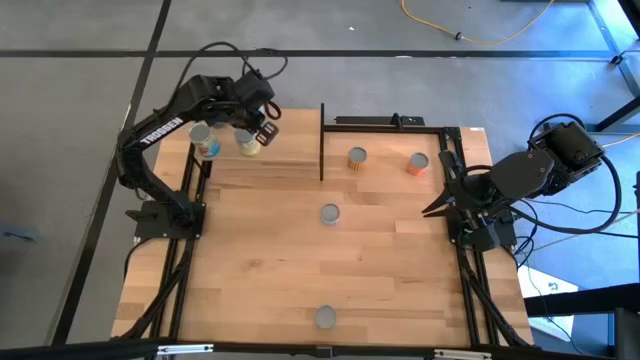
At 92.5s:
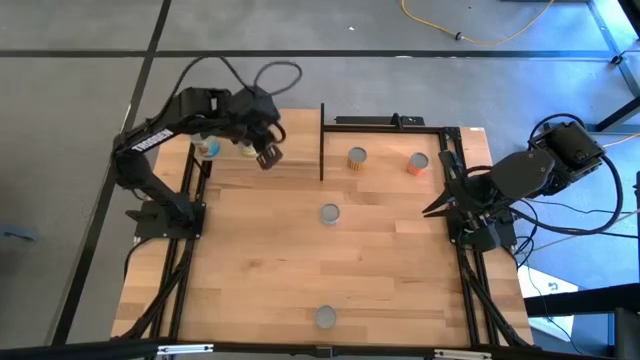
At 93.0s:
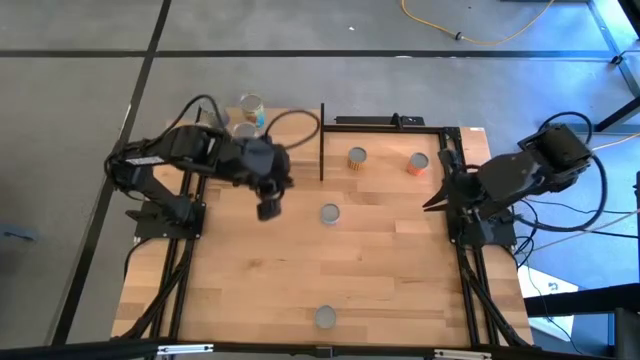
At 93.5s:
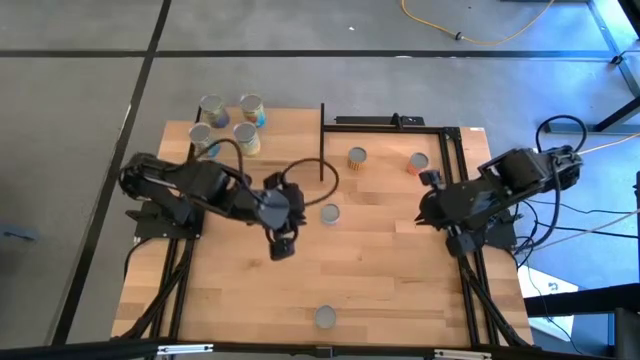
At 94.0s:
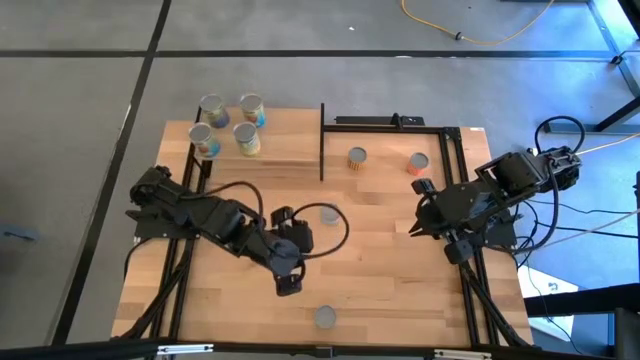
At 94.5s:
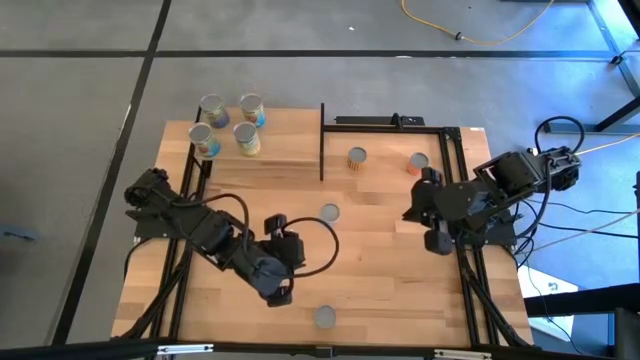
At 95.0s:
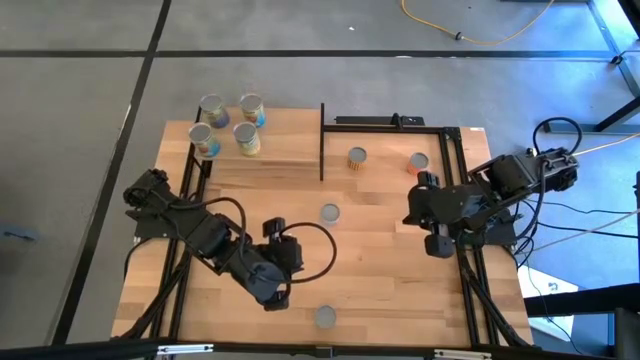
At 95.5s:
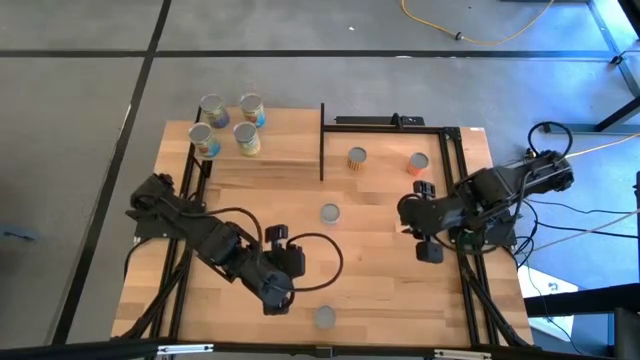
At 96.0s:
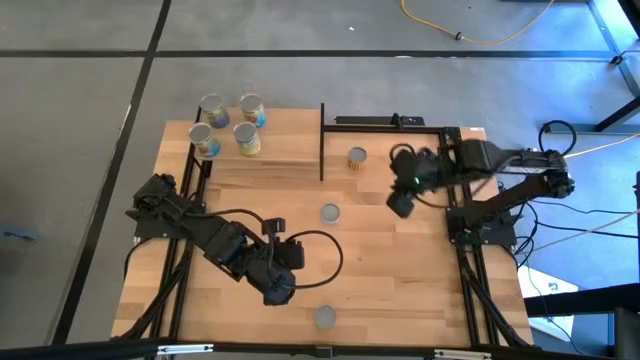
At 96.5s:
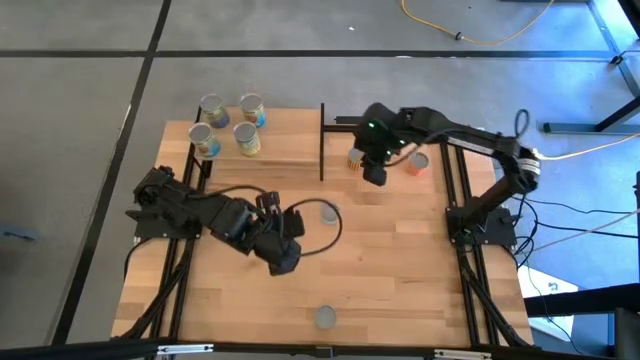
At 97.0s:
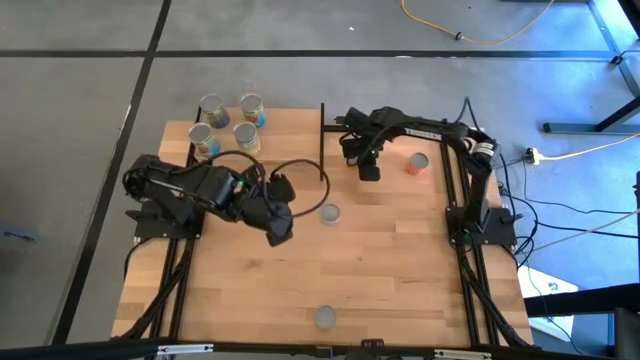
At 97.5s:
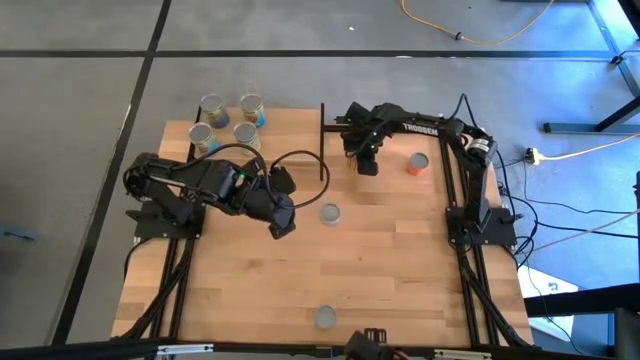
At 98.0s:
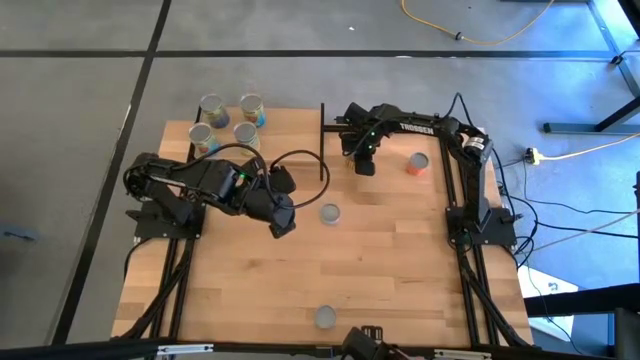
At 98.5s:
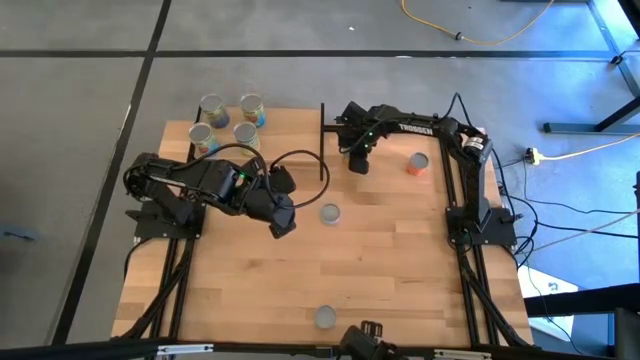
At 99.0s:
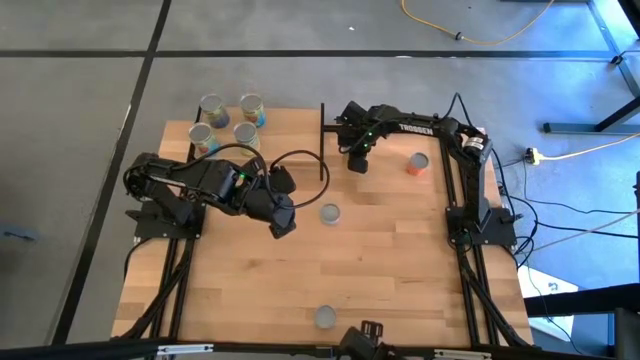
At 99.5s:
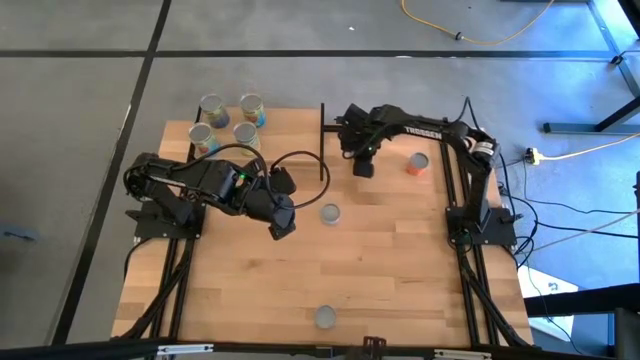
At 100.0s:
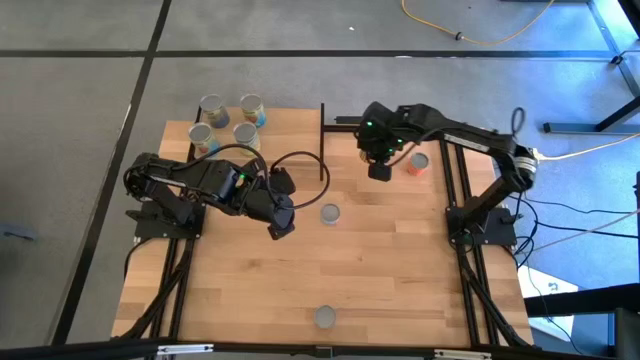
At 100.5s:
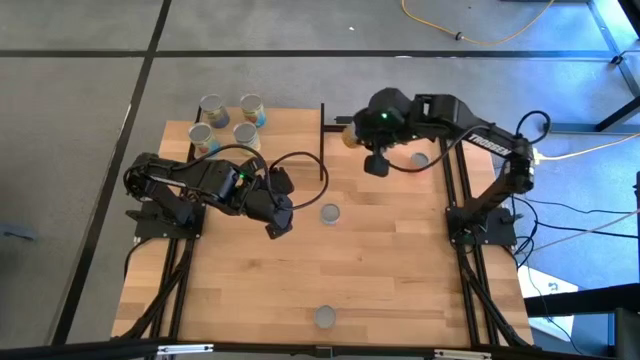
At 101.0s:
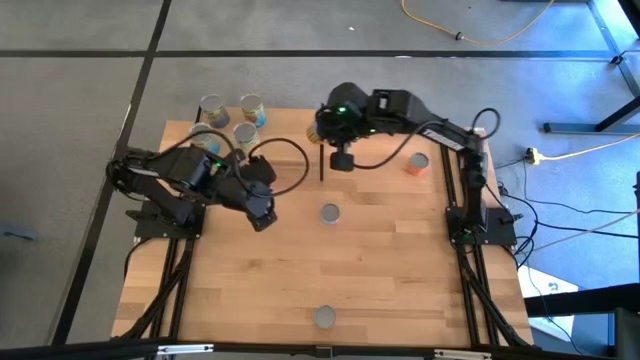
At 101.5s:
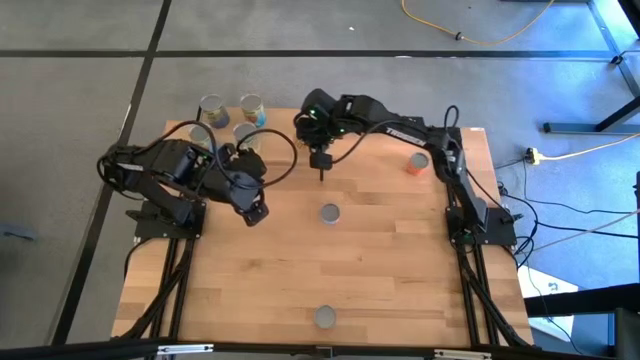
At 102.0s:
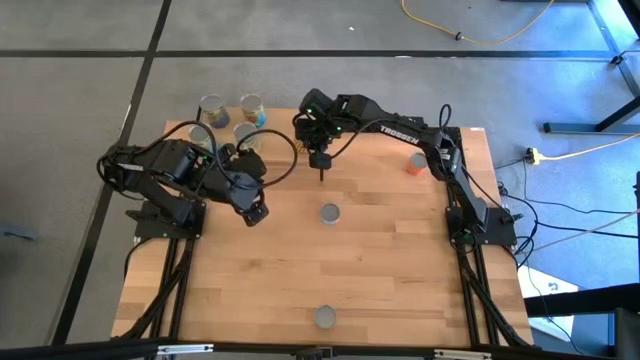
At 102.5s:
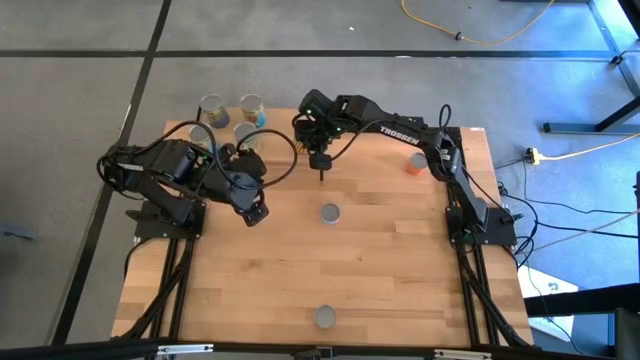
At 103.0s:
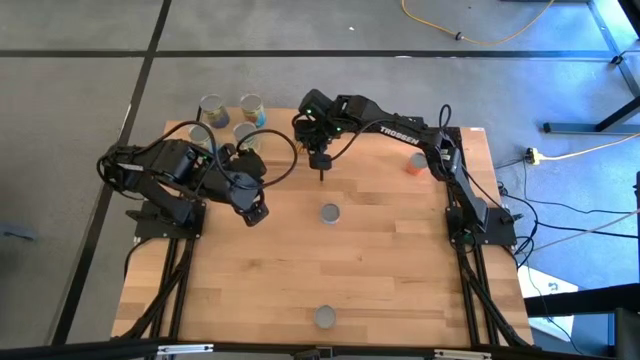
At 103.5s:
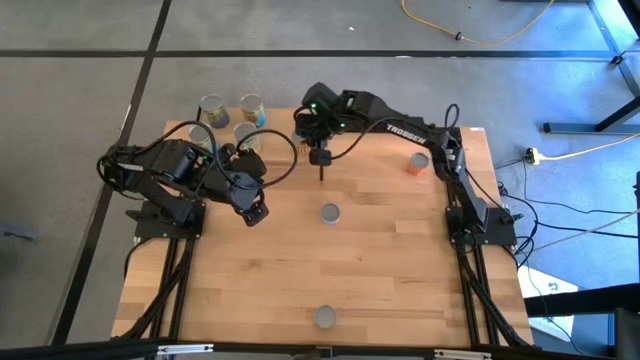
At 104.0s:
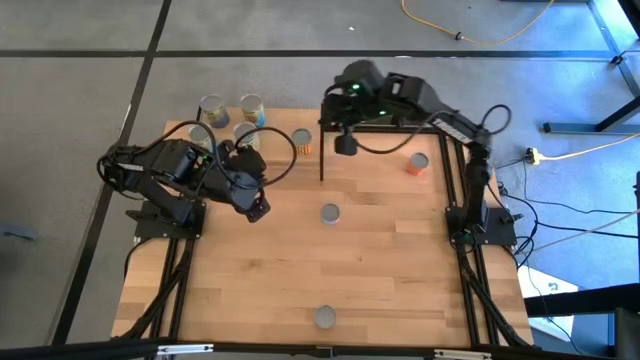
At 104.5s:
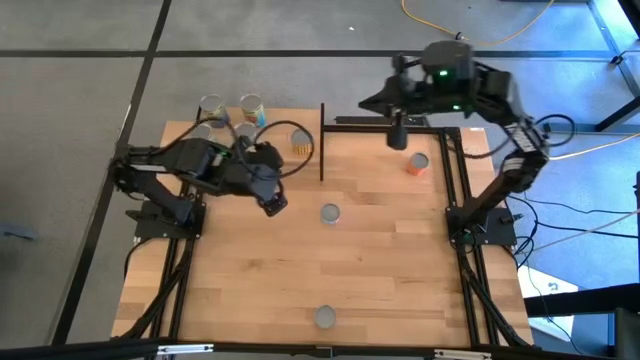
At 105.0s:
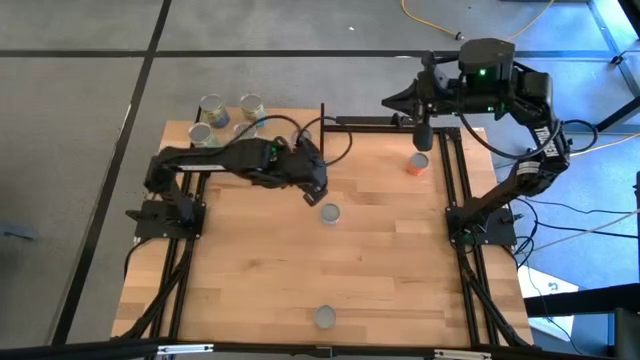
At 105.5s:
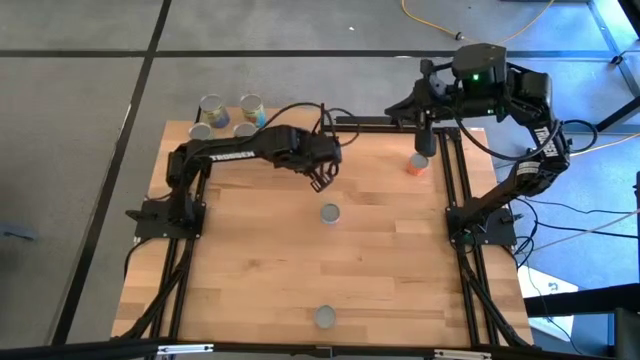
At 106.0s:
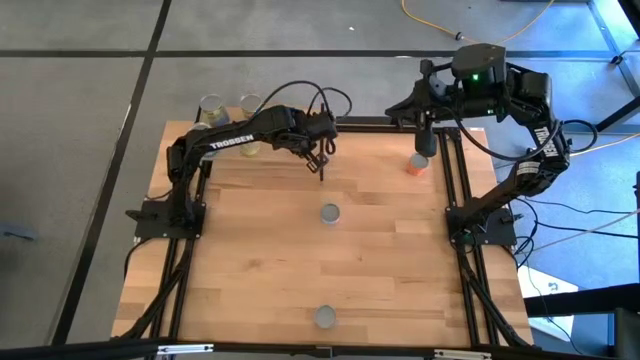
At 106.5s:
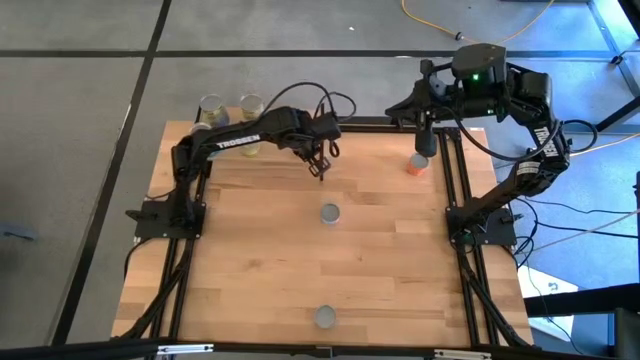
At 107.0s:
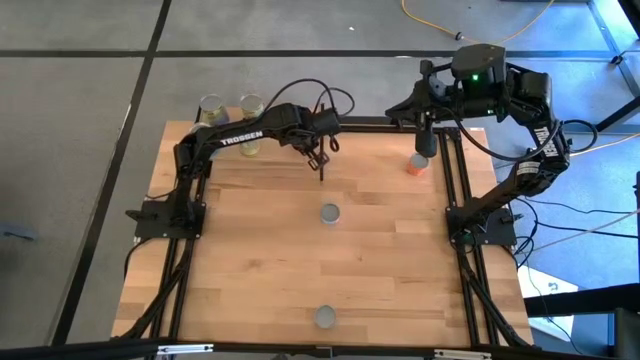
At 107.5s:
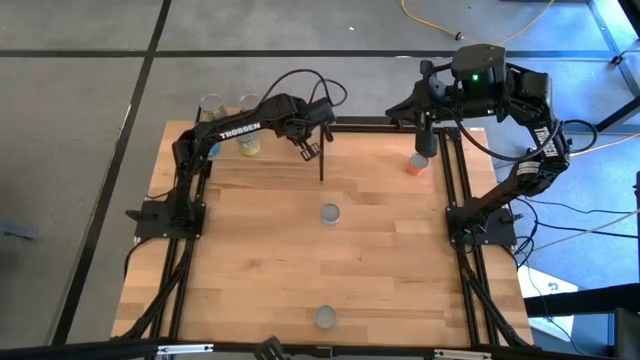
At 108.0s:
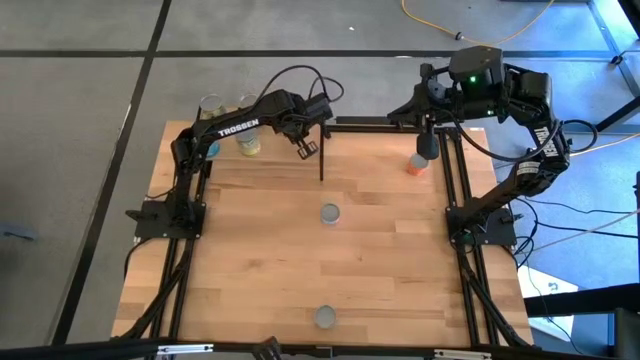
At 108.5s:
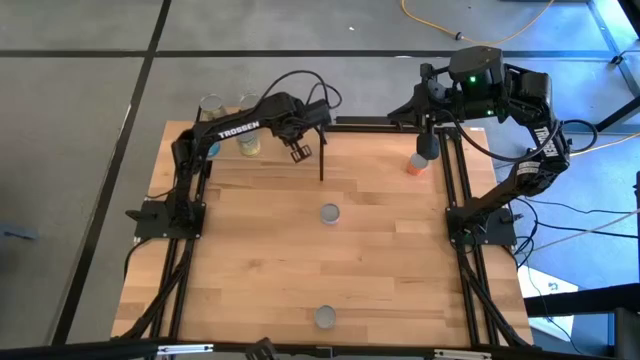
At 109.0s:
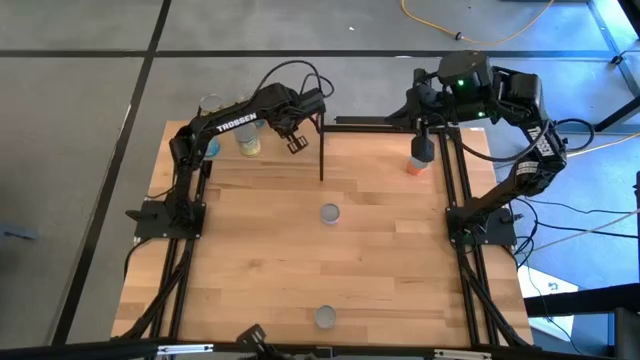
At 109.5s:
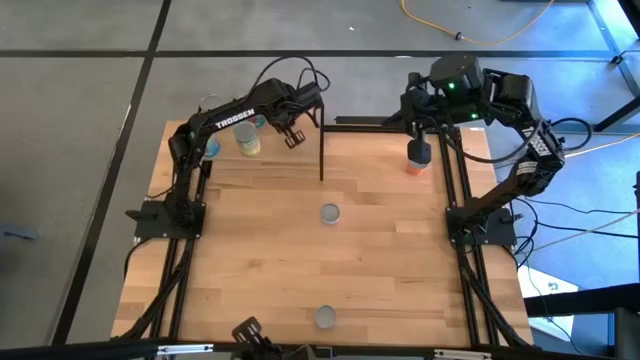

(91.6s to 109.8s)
Task: Pick and place cans onto a shelf
Put the yellow canned beans on the shelf

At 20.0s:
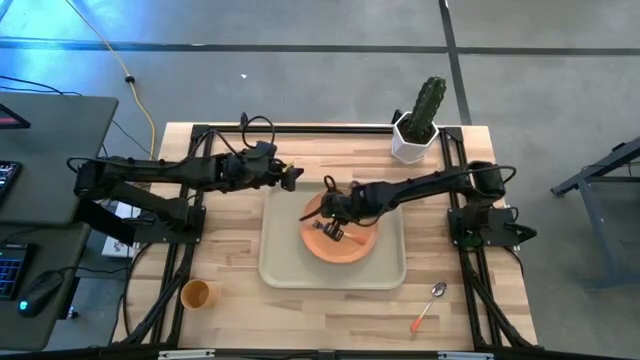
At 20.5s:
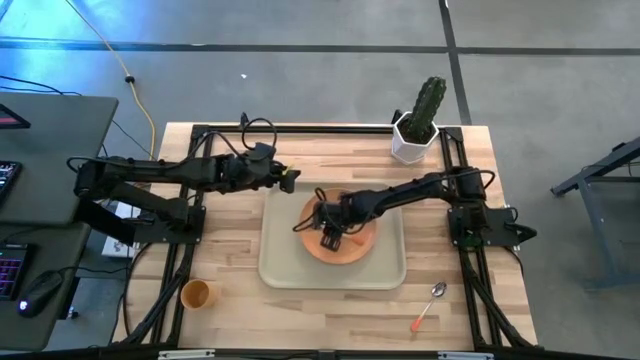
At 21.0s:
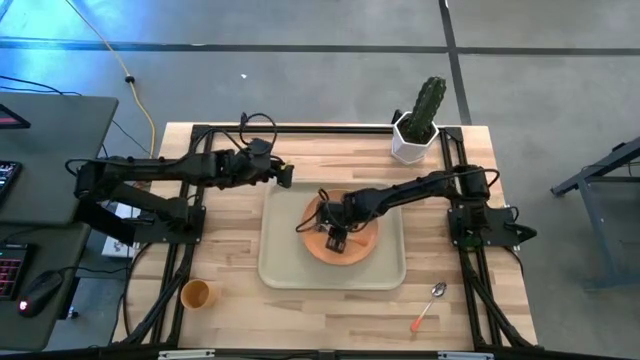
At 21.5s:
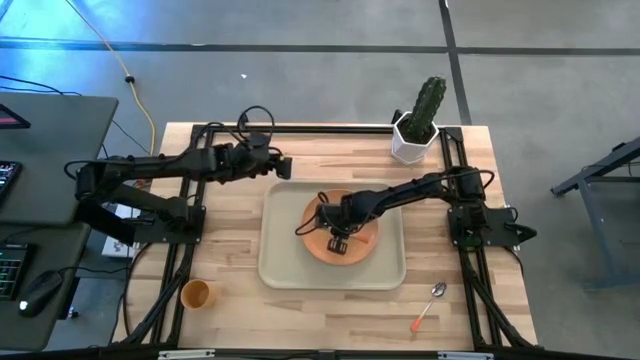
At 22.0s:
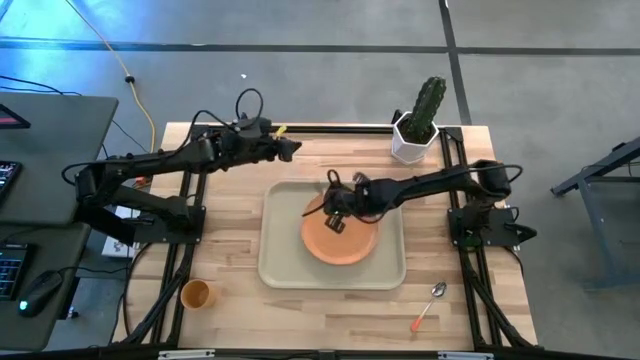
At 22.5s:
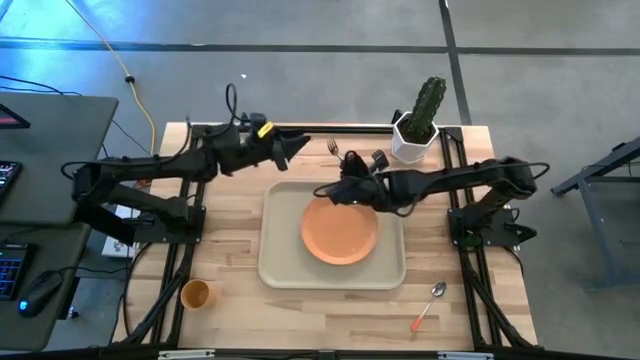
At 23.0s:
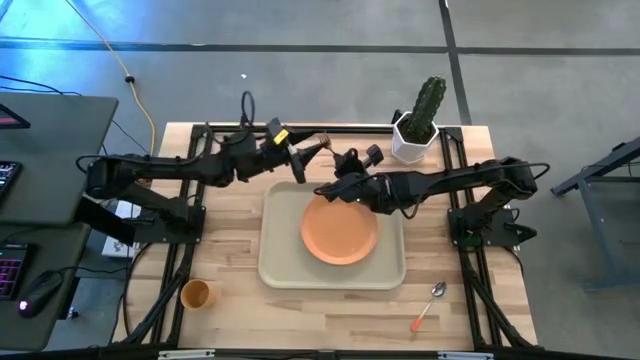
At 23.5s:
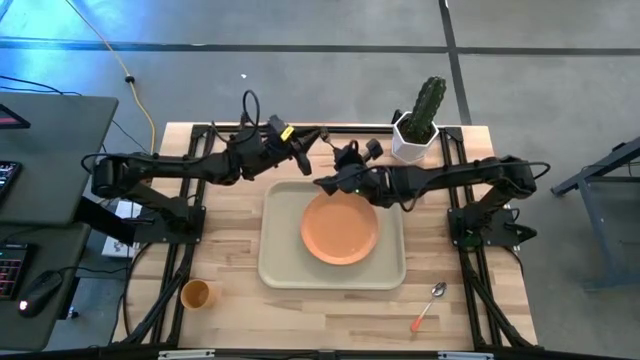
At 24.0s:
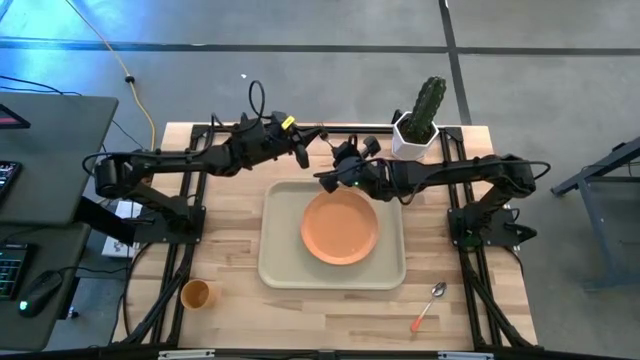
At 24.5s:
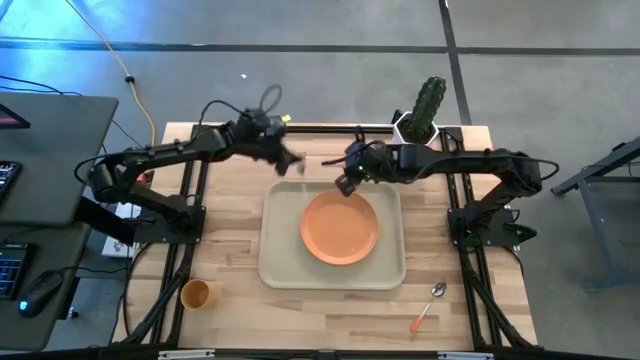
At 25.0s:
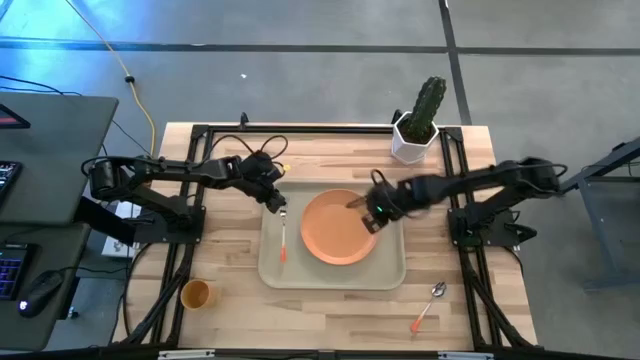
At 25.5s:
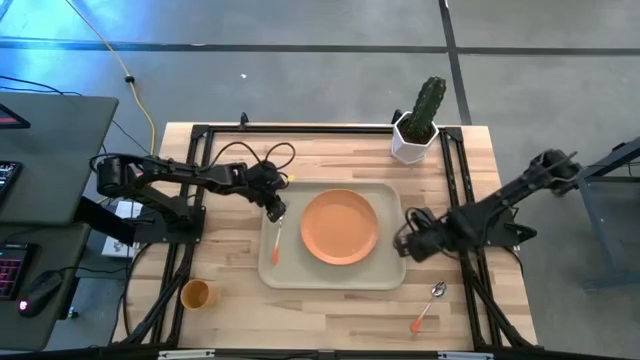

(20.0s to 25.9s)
Task: Pick and place plate/cup/fork/spoon on tray
Put the orange fork on the light brown serving tray to the left of the orange plate
